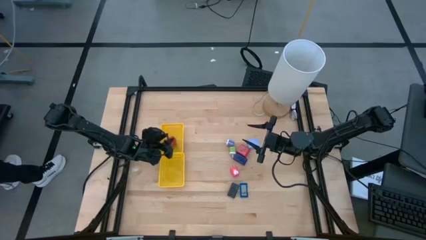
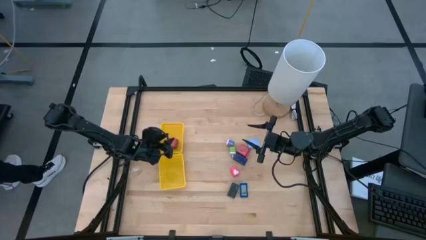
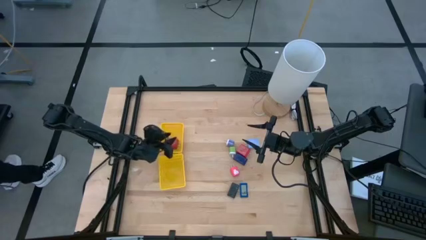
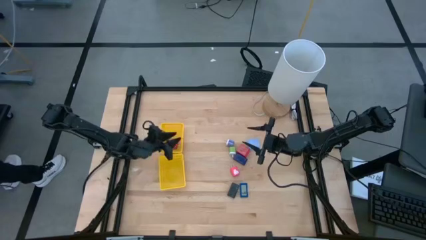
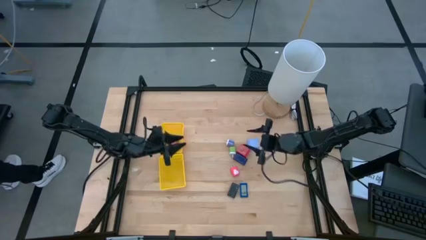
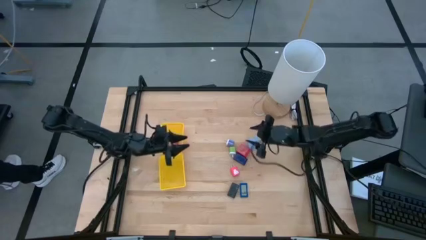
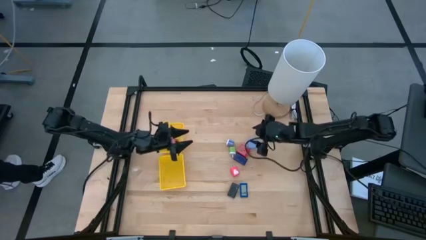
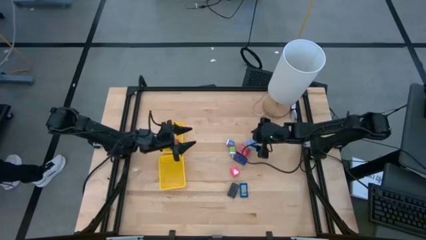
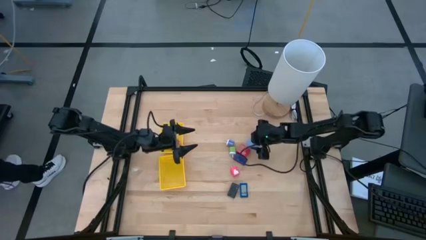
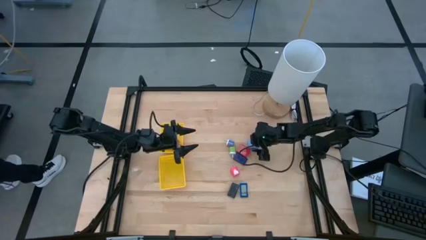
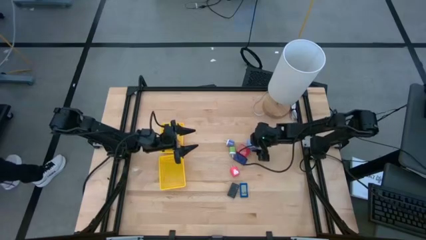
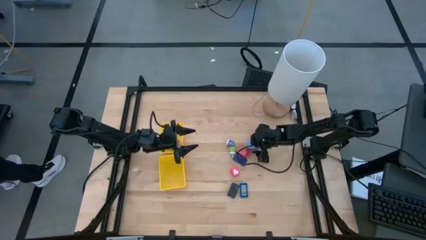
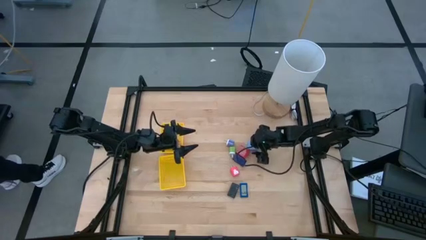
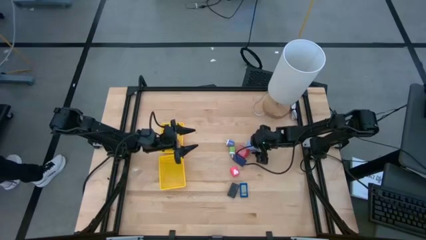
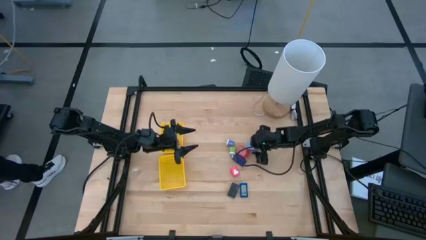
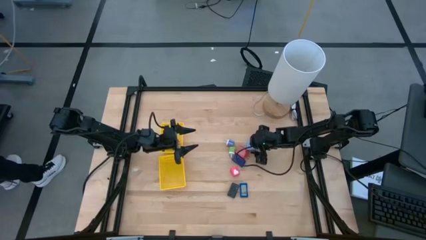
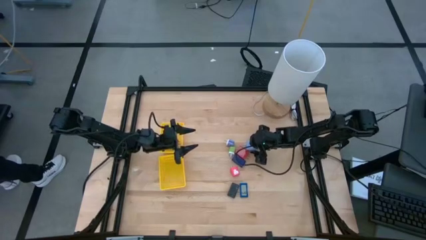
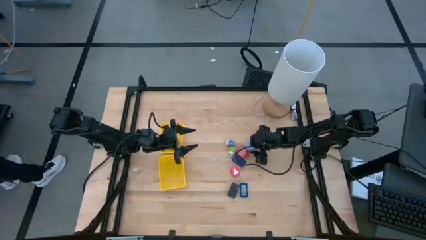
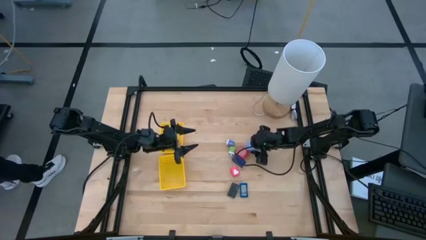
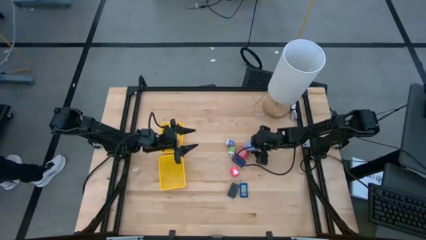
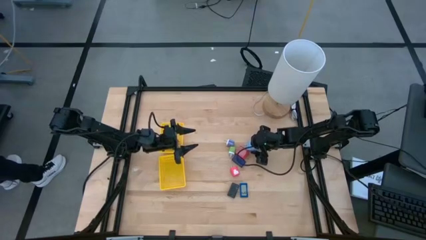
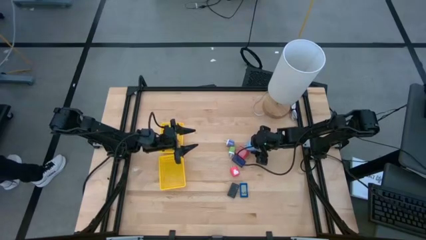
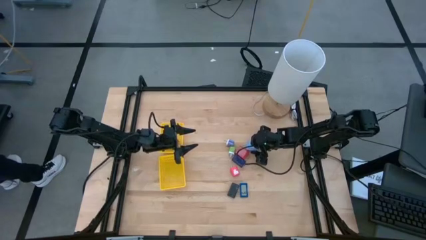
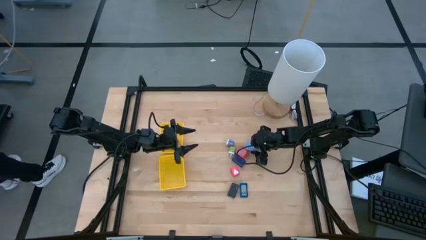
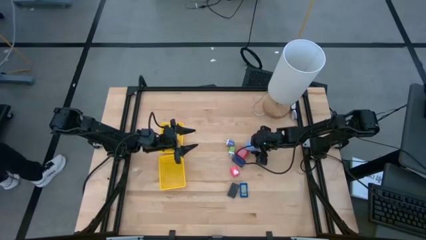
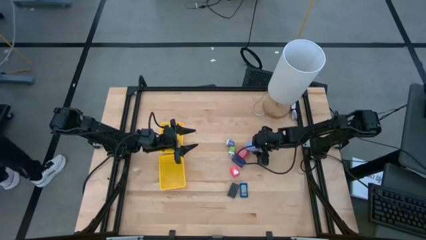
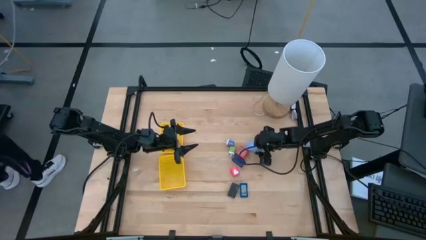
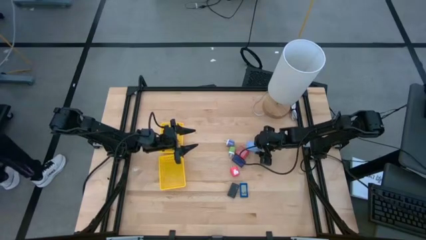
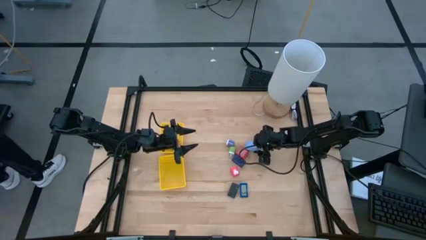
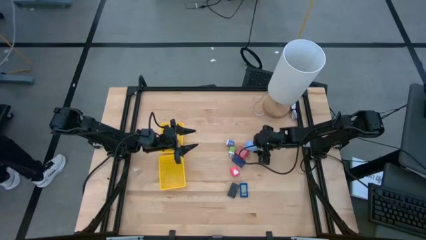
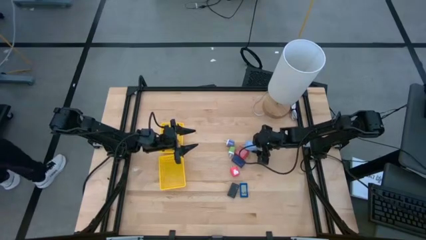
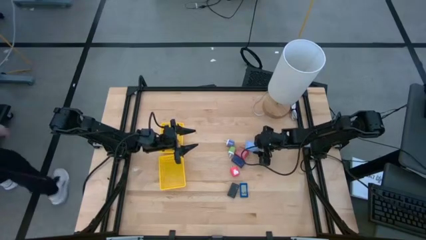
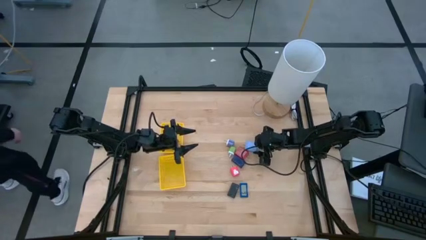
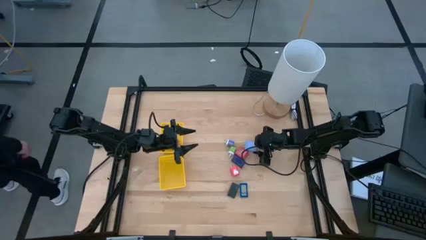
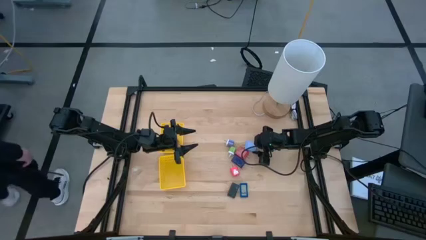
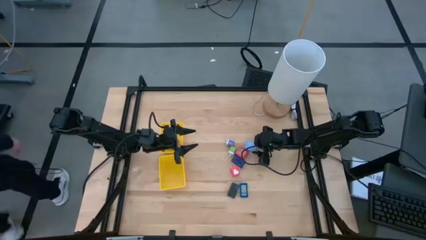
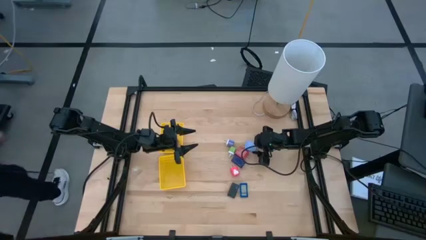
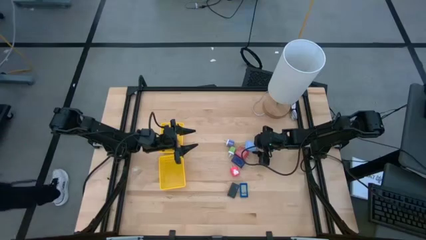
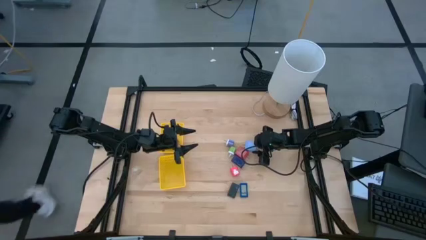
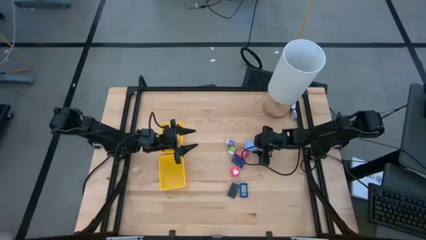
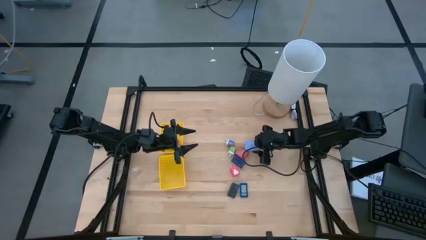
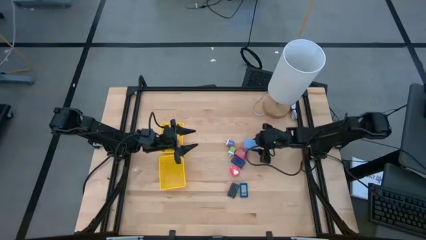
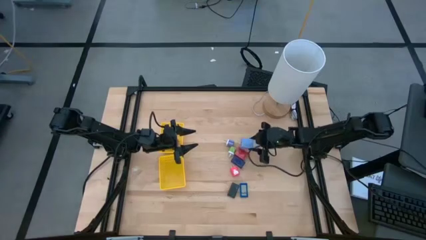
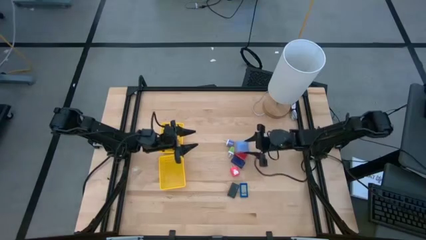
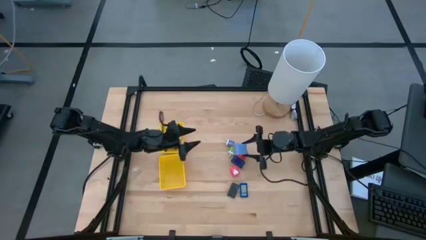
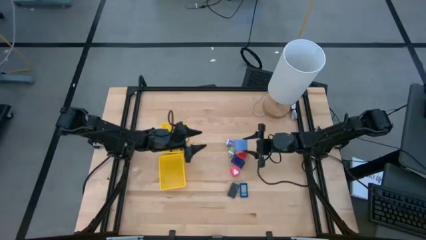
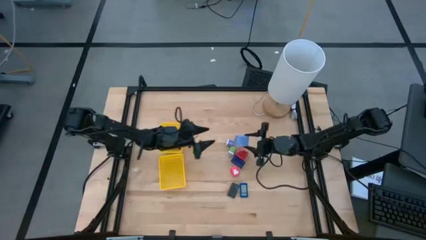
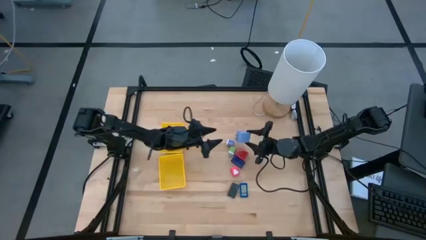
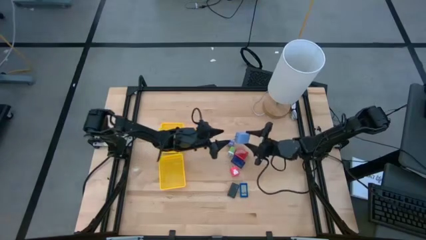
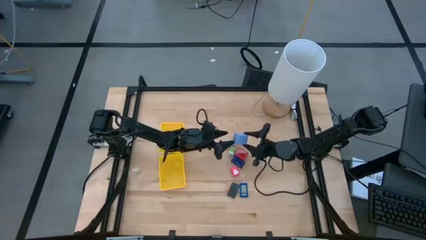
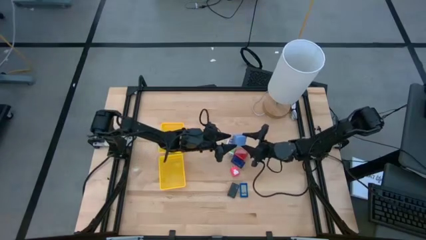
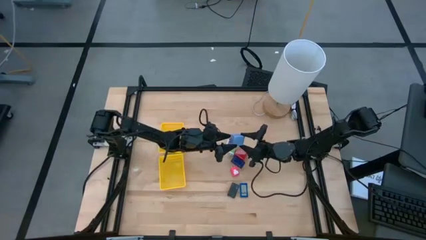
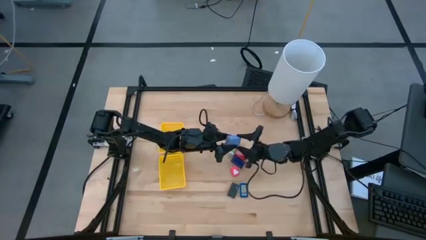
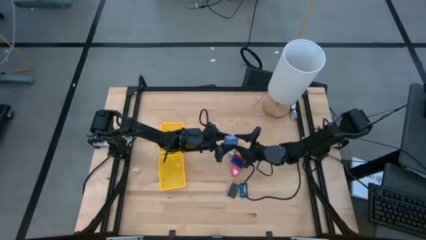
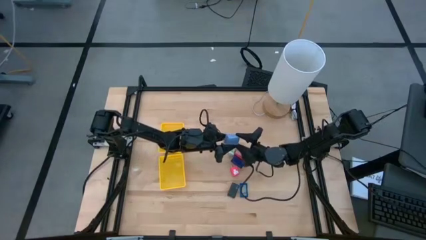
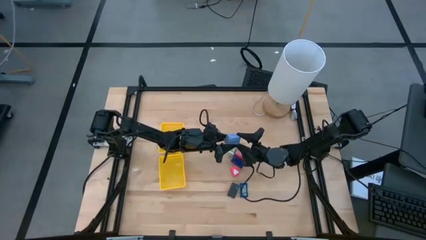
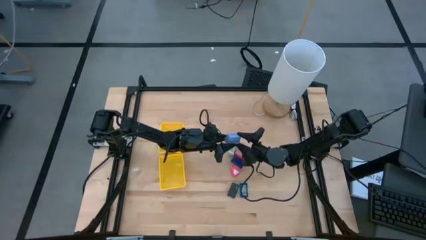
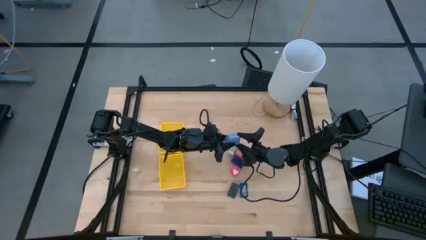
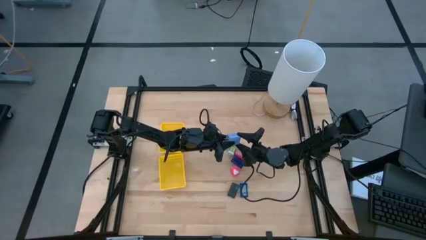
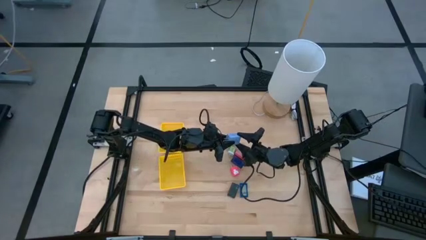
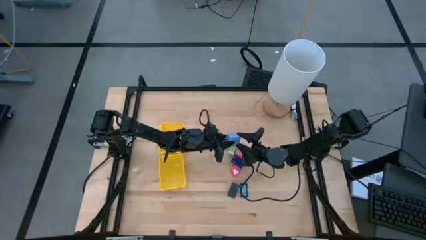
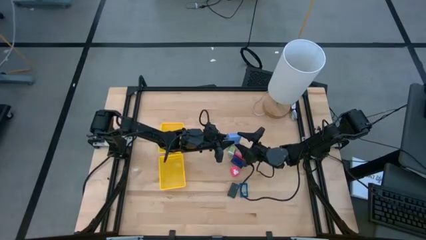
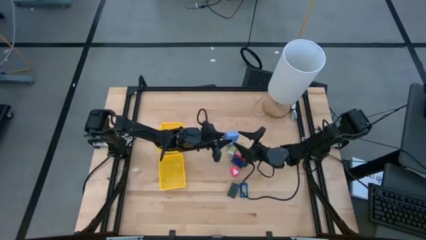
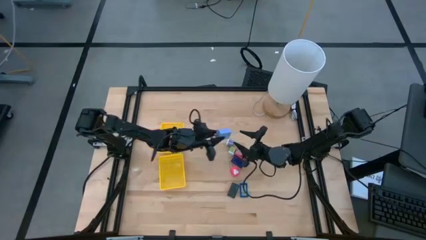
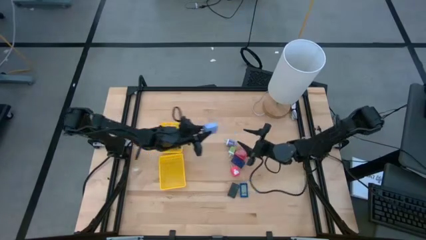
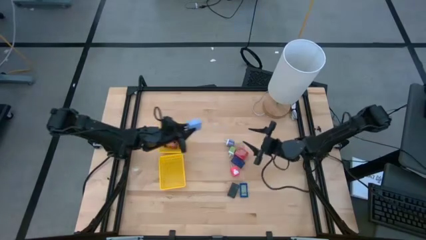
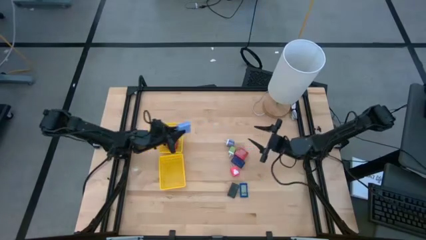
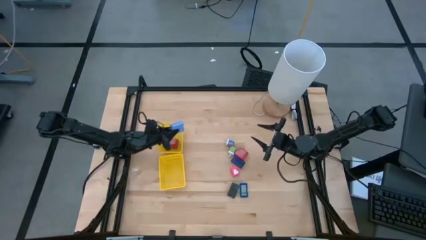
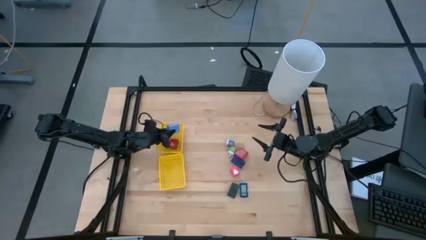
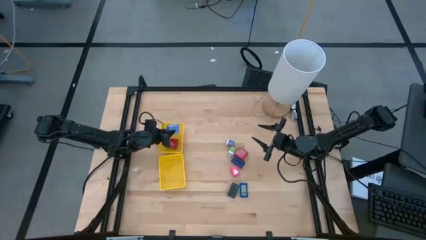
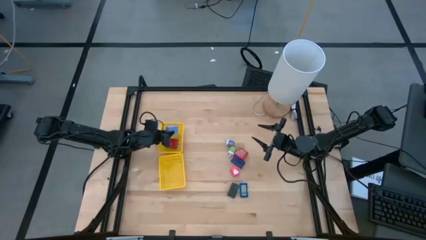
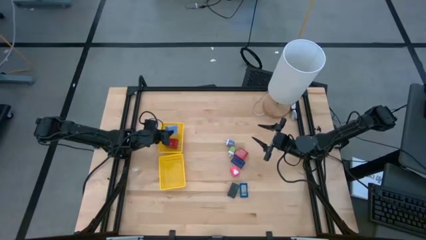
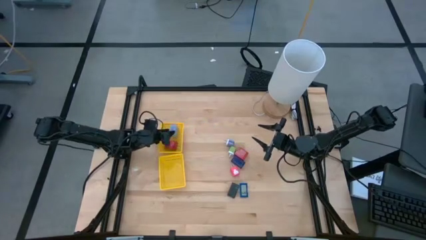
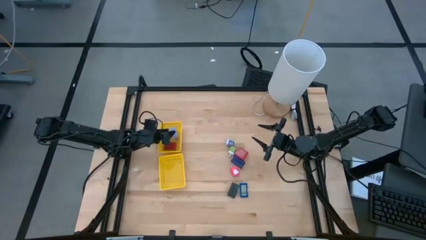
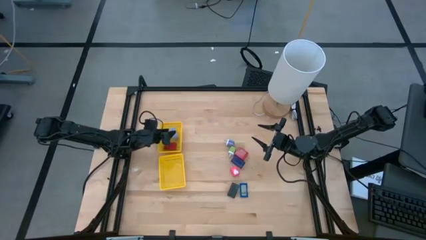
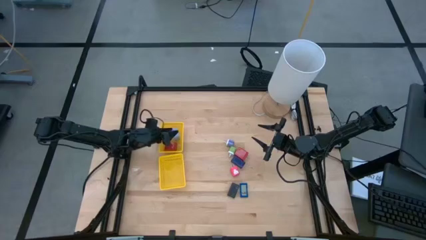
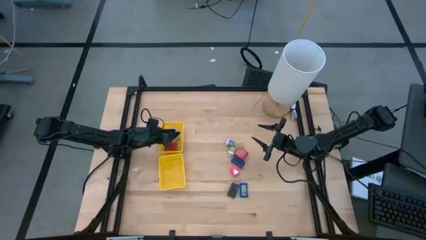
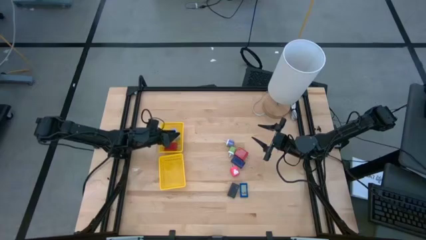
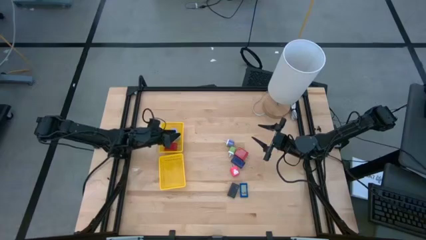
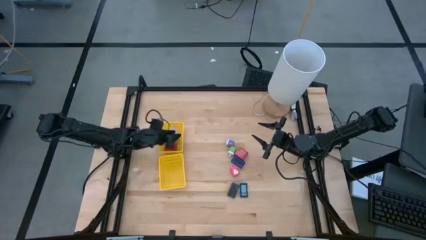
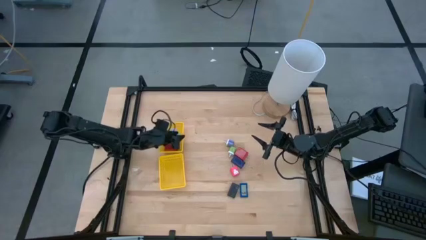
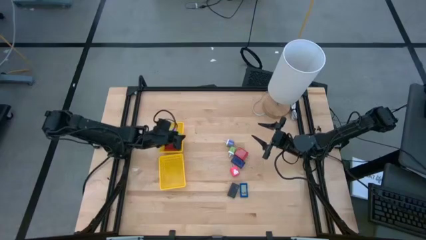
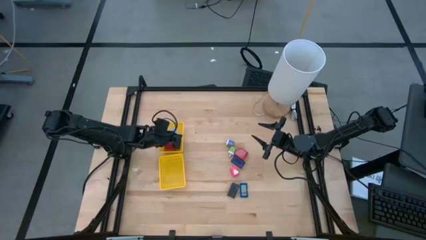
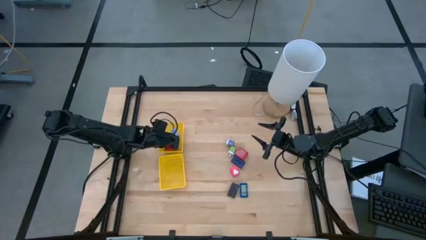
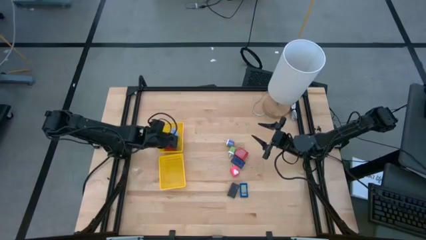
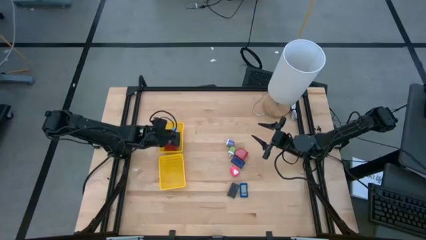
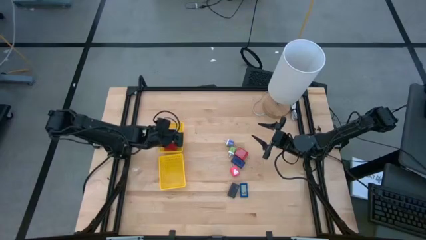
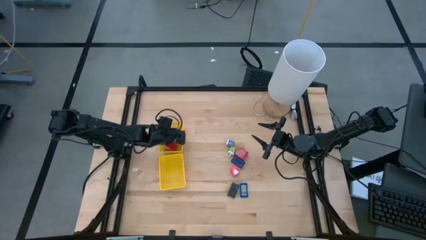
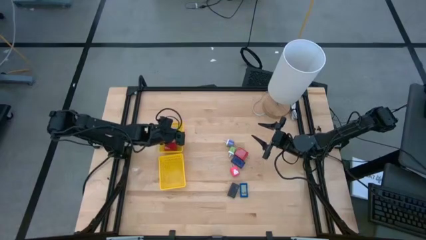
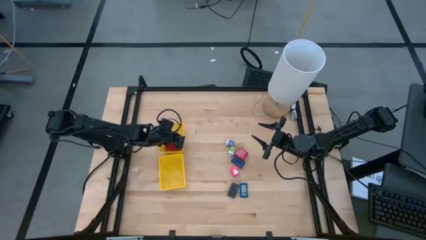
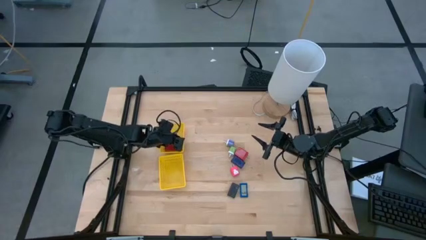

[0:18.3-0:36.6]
Task: Pick & Place Office items
Put the blue charger adapter into the top yellow bin
